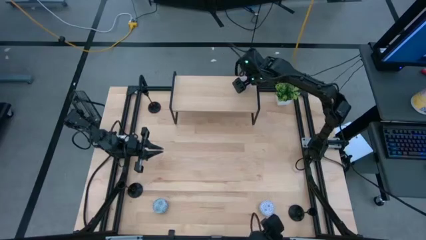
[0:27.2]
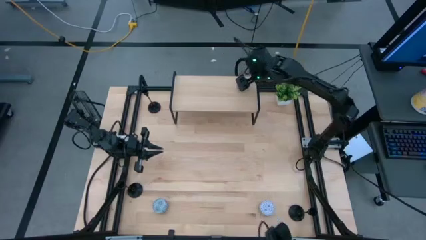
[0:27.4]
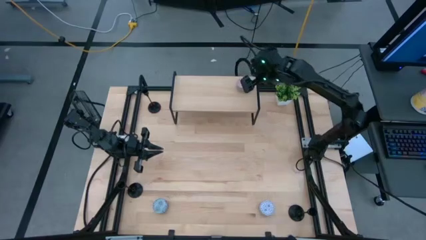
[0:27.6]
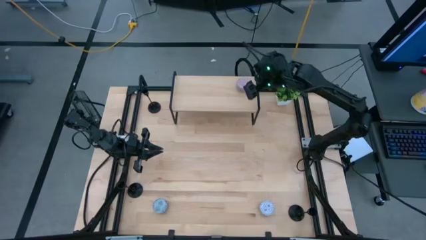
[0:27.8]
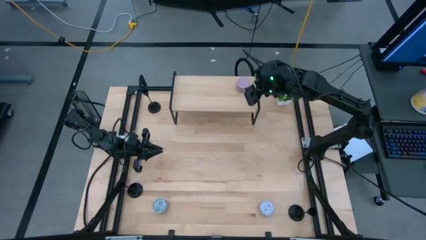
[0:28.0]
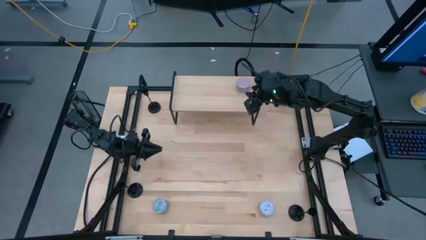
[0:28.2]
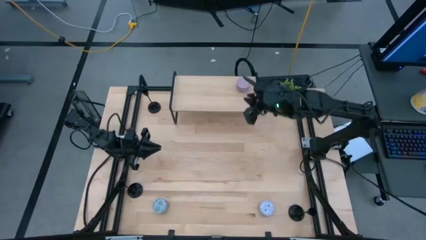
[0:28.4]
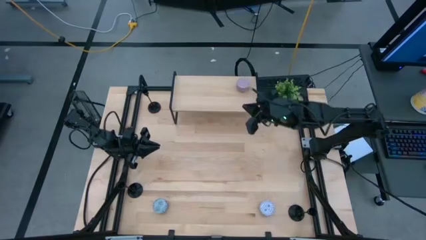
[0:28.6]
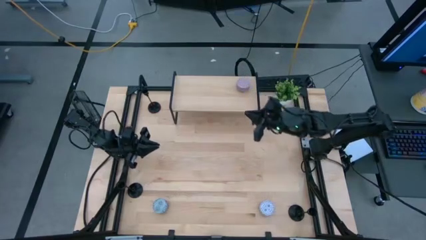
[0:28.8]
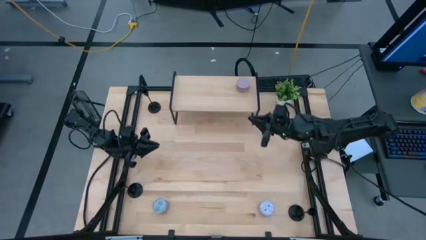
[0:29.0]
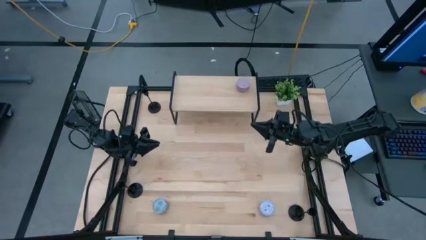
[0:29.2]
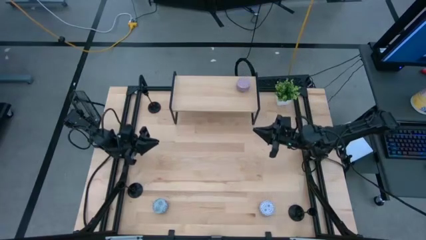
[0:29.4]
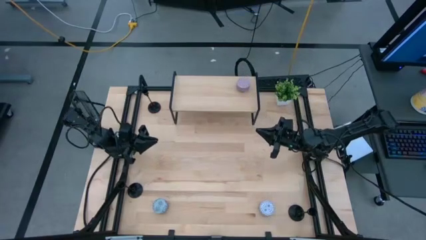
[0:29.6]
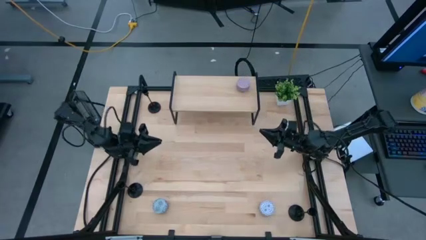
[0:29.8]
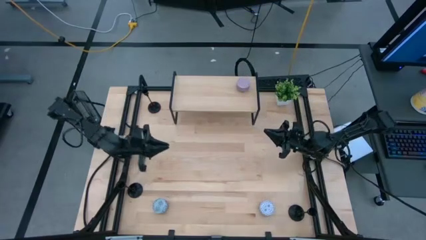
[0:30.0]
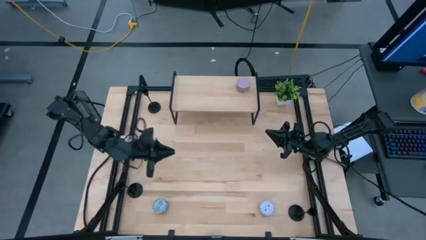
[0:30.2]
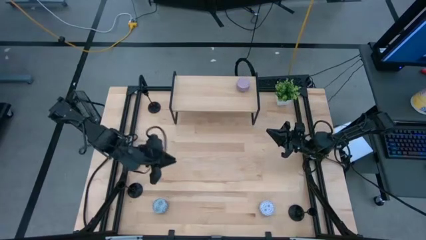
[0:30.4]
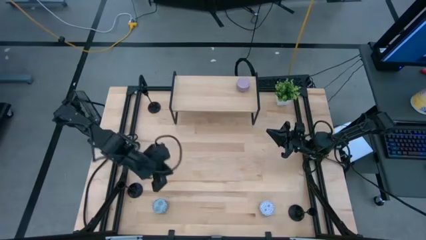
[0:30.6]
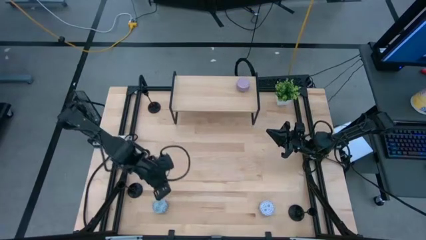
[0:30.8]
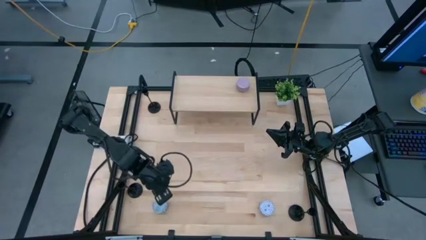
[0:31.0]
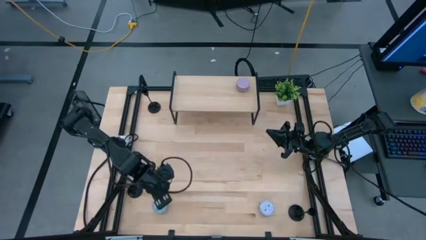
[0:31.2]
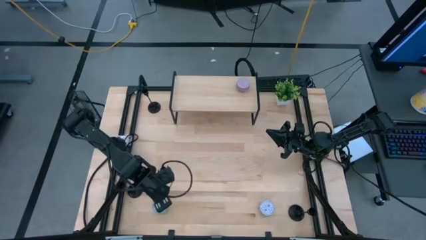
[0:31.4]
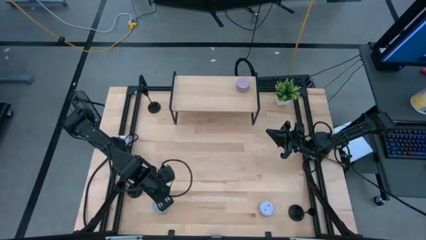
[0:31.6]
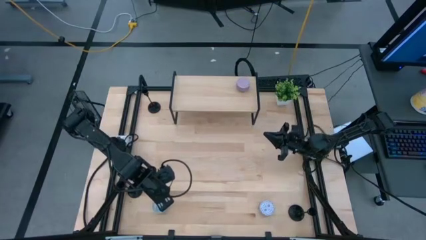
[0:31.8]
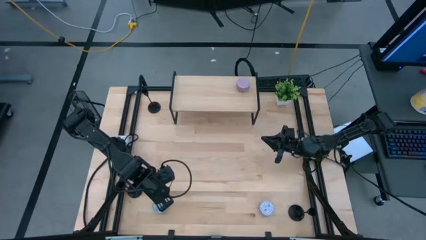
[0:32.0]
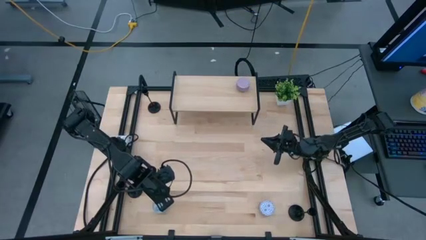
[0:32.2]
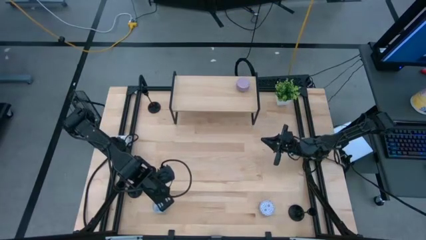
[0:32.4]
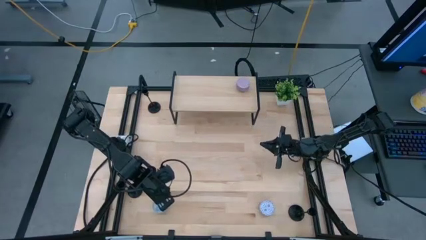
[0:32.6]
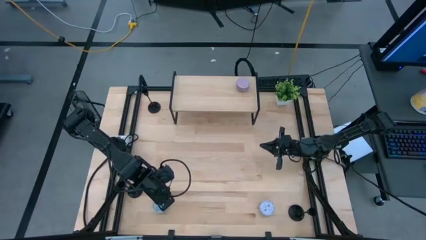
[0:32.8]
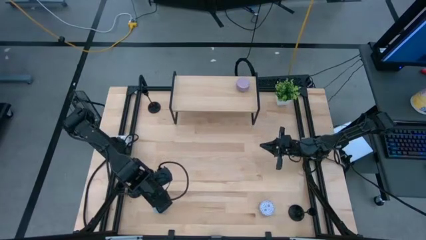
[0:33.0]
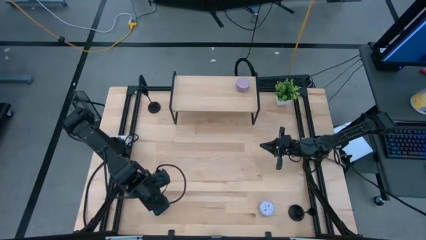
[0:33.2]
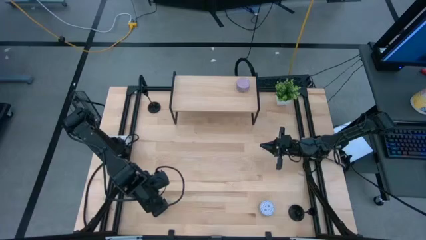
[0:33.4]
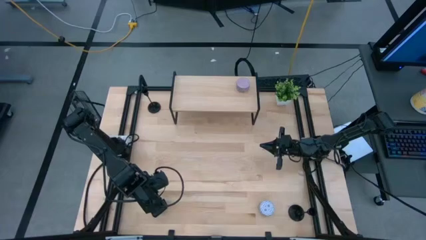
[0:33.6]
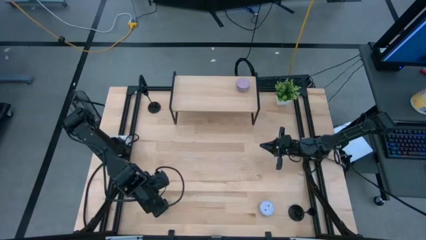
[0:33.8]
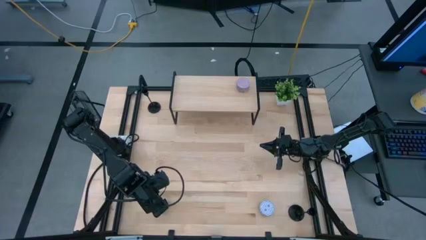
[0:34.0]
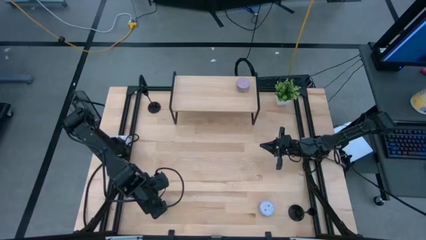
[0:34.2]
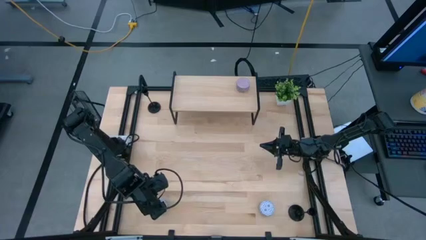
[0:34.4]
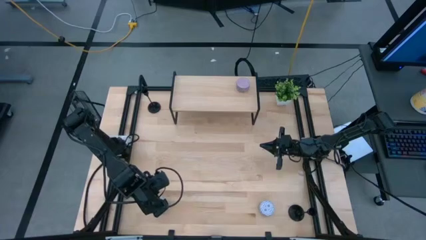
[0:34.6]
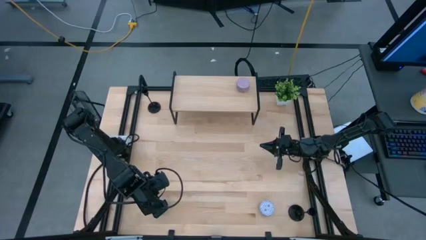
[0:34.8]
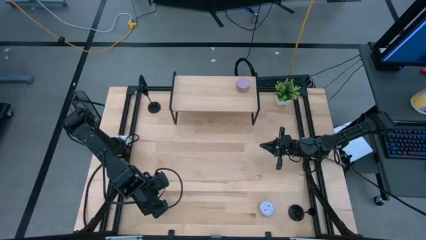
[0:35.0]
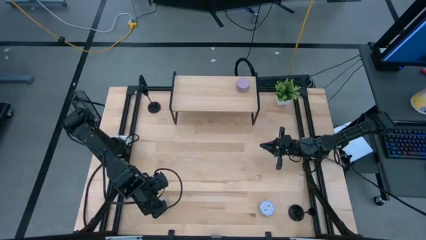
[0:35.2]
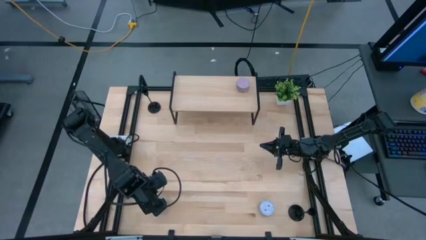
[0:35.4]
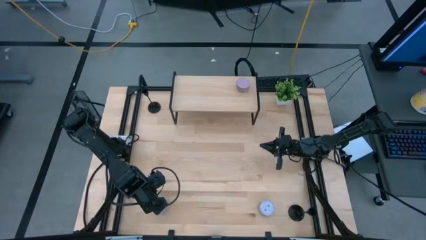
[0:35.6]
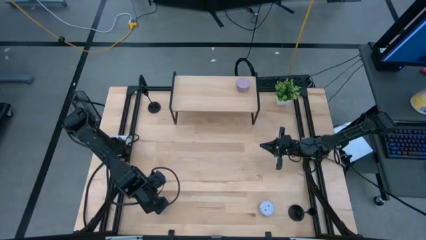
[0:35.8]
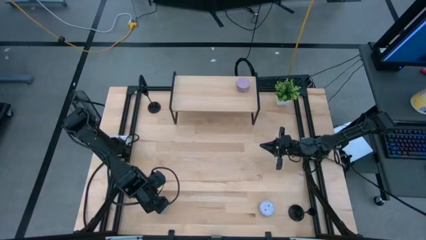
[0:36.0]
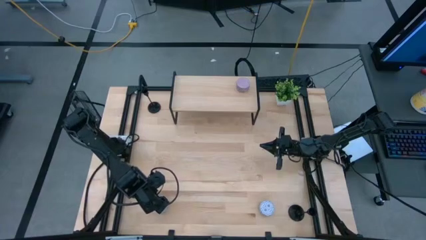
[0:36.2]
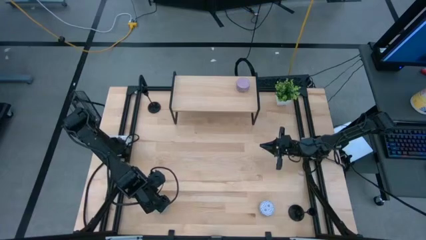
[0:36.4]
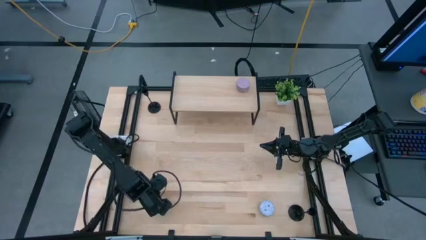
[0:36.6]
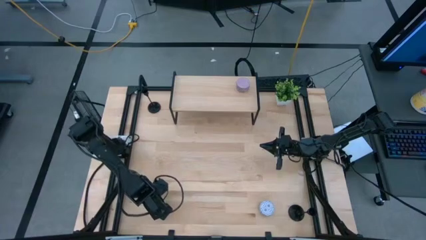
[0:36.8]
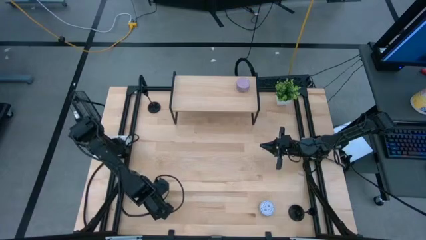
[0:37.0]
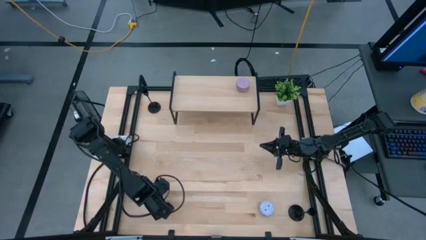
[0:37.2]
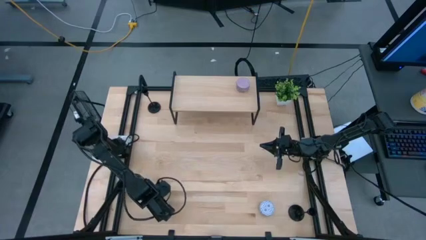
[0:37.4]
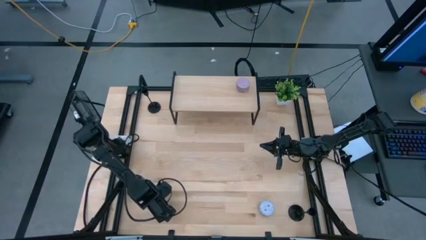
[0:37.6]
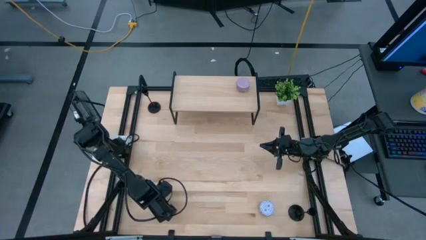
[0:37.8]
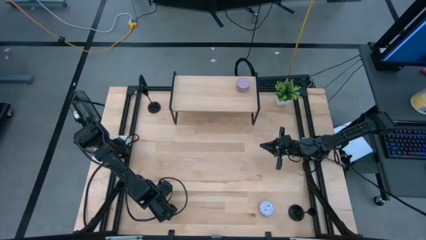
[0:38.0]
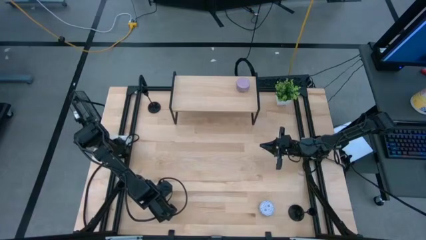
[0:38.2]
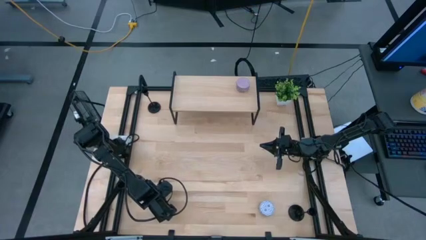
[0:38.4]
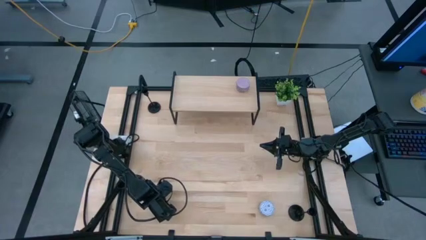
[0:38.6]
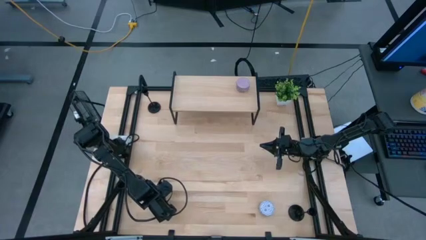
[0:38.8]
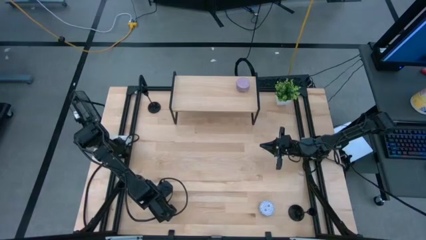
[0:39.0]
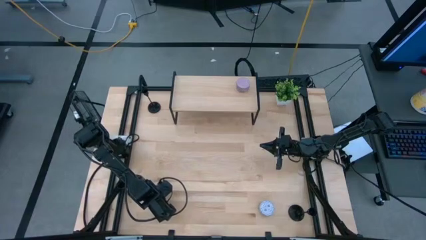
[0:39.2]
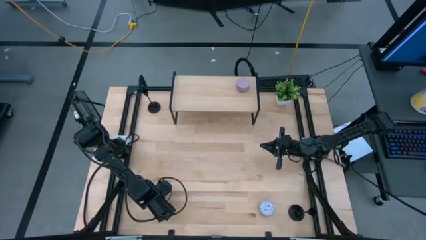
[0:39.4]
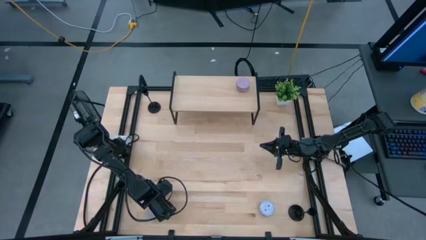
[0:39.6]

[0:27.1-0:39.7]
Task: Pick & Place candle stick holders
Put the green scented candle on the shelf
